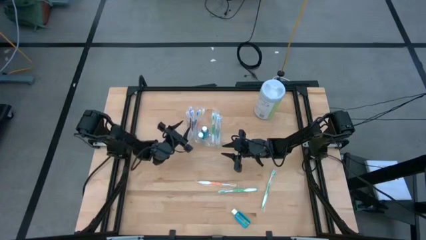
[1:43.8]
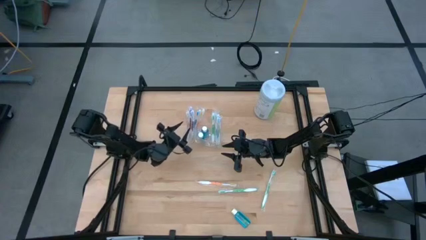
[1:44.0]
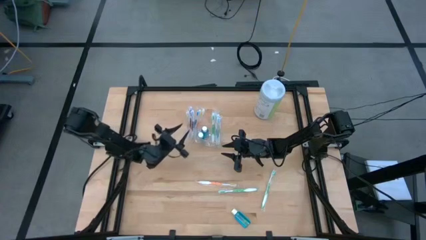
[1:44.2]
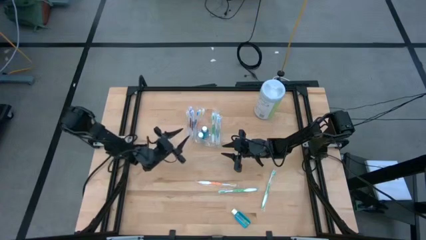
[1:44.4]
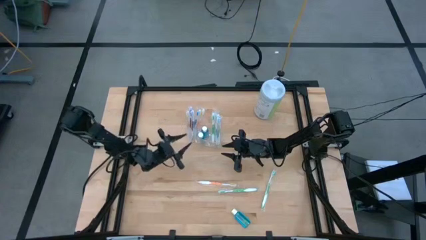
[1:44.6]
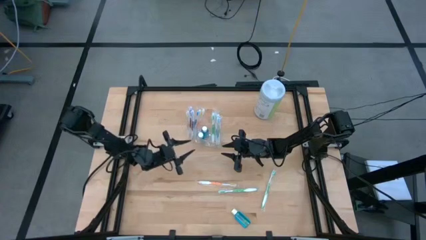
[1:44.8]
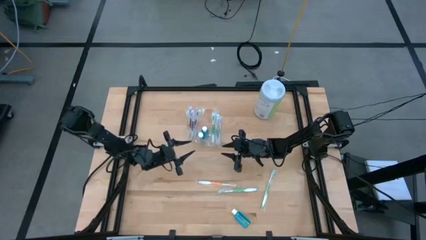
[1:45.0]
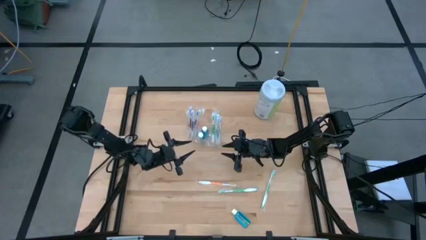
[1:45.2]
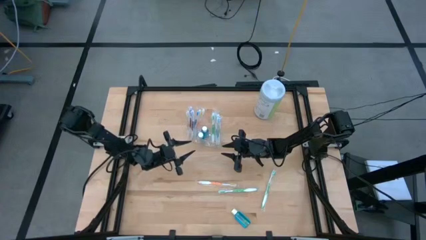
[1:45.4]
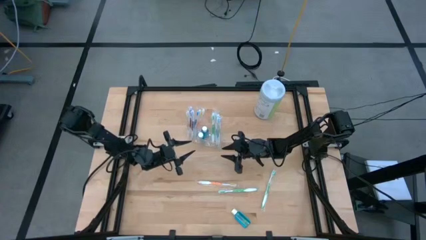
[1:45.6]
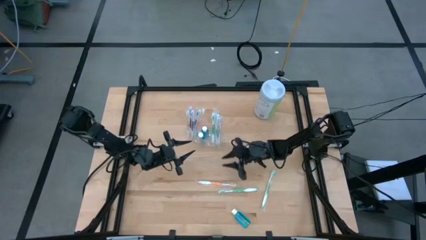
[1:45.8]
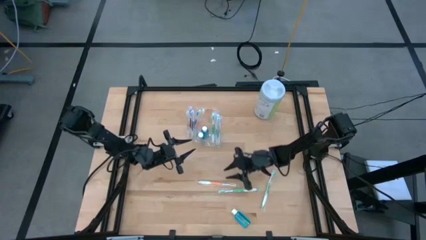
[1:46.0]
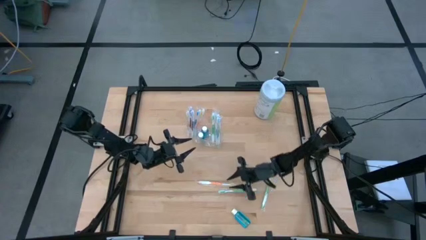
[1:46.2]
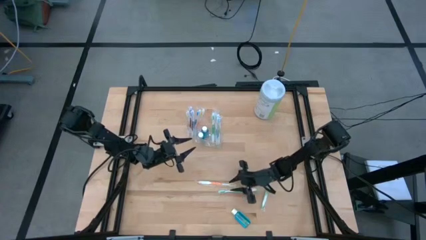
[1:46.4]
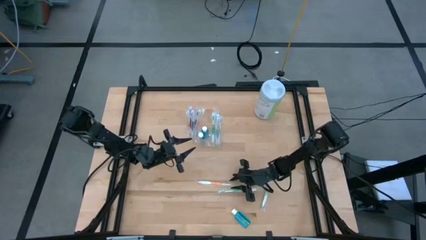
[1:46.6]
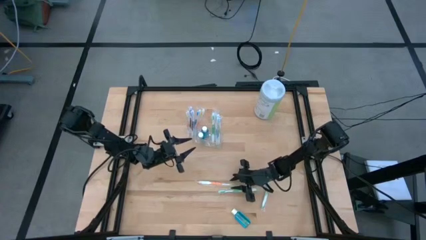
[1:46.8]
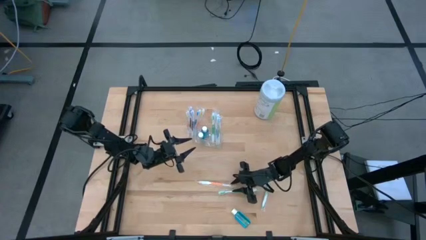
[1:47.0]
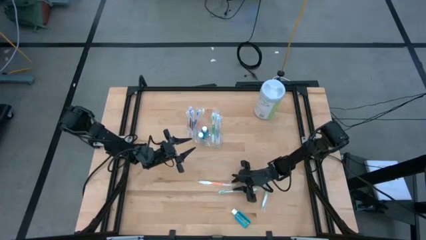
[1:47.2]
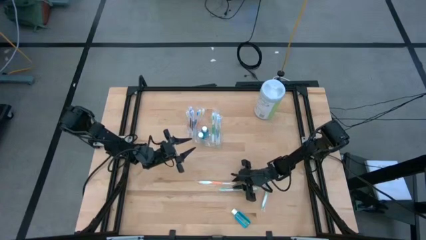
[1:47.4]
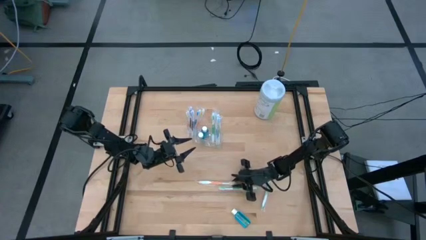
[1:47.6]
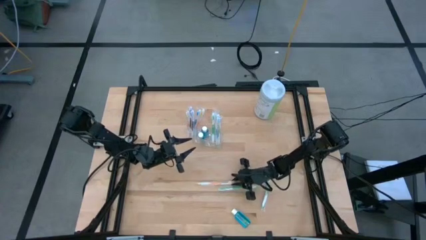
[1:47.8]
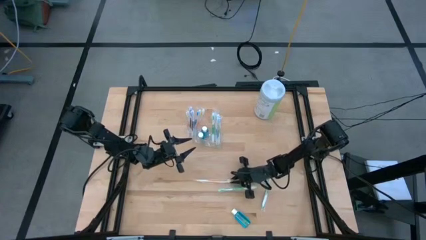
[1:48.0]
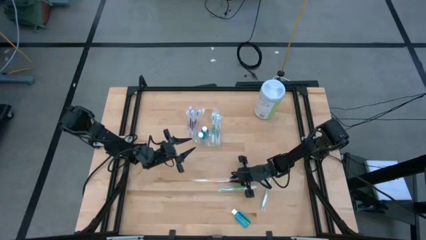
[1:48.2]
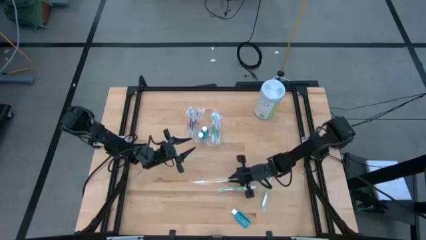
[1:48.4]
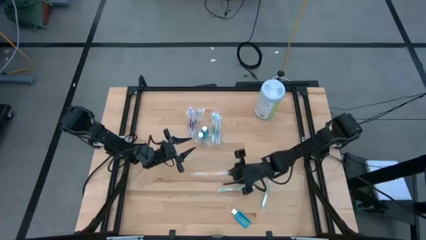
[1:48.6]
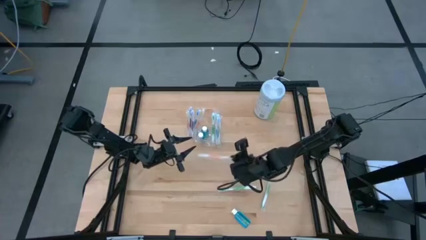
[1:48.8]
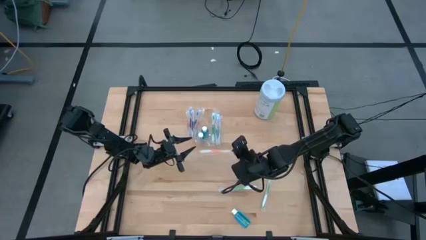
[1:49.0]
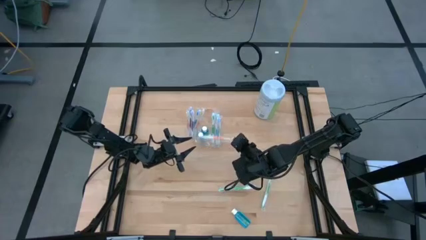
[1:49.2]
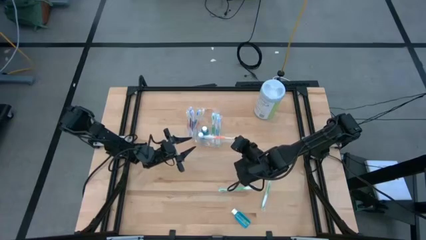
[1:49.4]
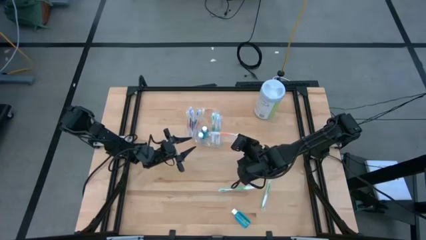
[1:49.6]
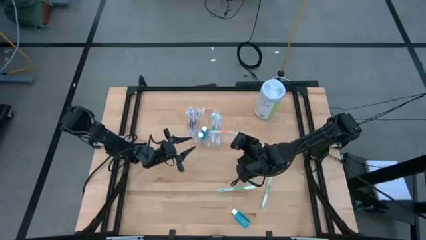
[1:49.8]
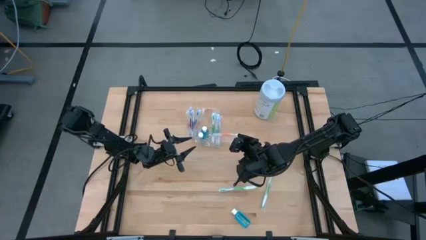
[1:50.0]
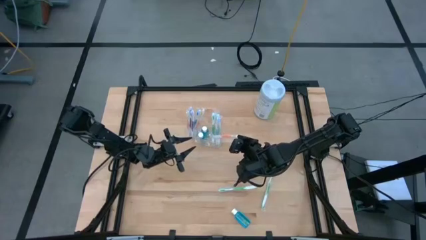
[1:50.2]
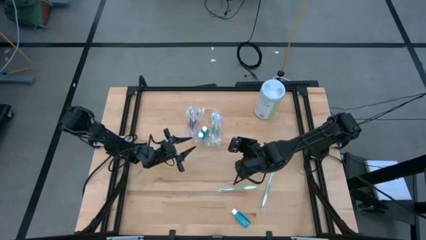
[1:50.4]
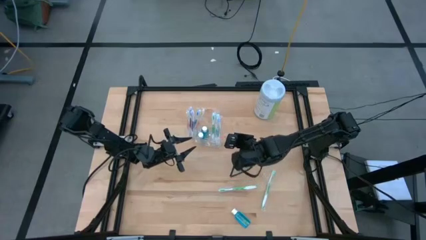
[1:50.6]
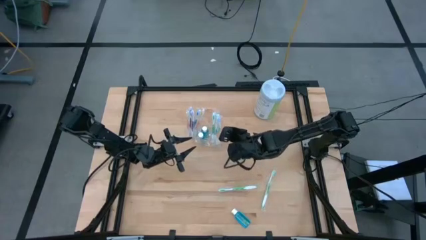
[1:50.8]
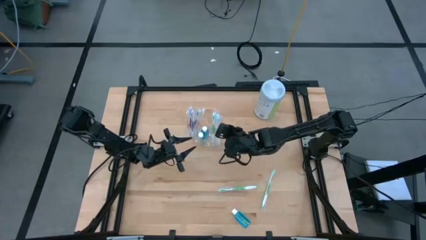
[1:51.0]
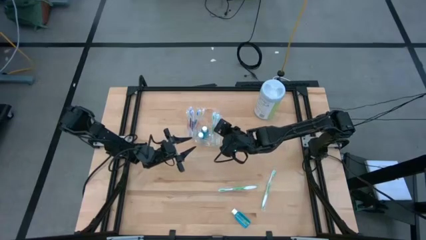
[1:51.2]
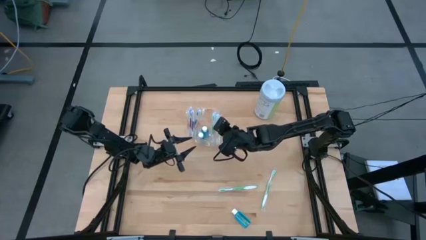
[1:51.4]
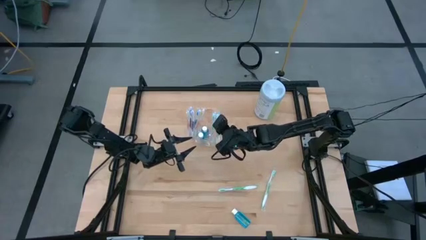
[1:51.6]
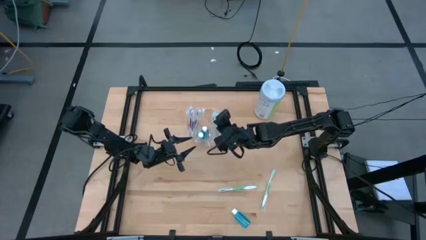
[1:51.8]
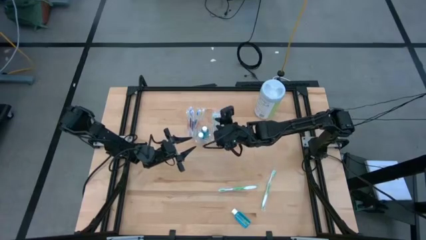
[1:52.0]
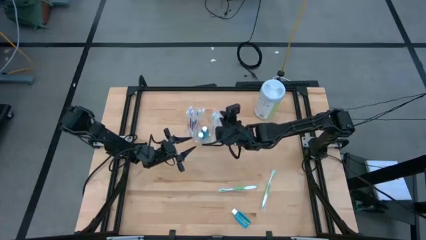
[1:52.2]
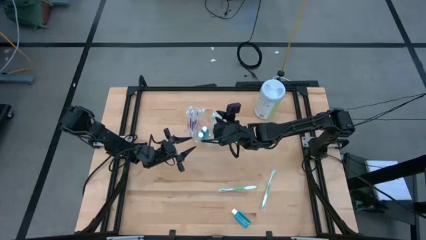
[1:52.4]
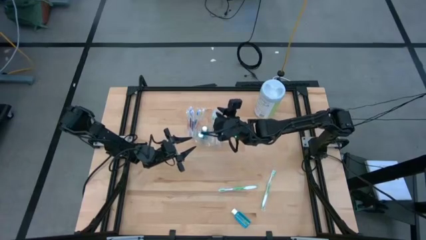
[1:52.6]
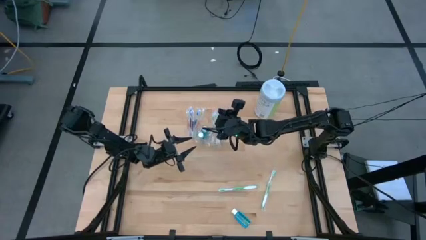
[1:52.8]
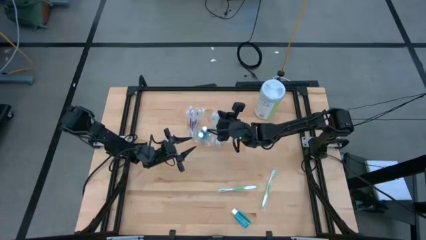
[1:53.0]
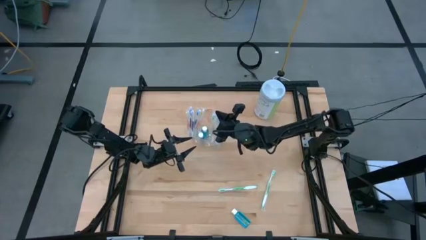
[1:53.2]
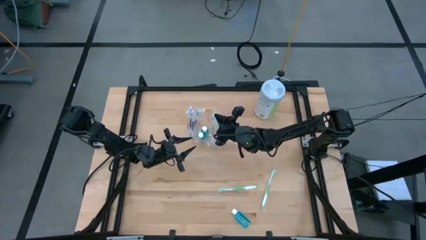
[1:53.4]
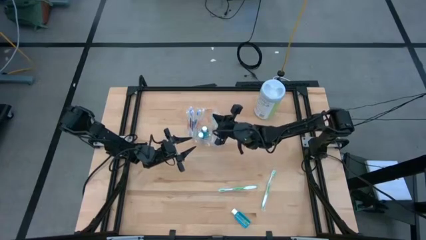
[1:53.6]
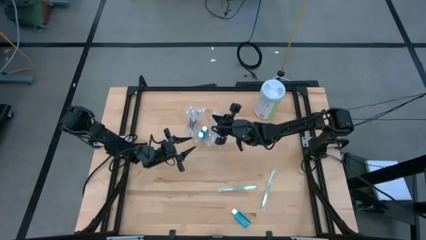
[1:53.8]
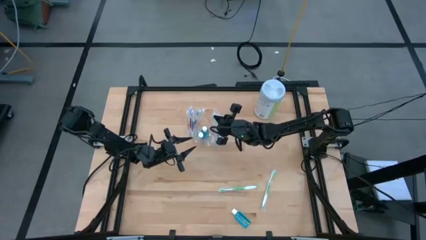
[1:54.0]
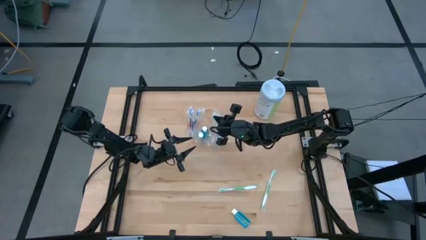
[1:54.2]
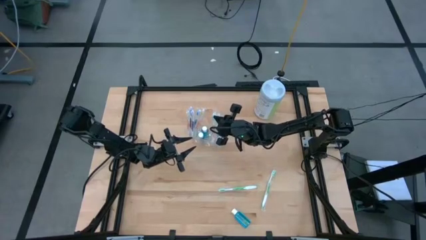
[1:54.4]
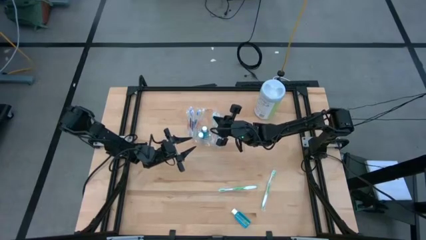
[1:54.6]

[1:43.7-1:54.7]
Task: Pick & Place toothbrushing station
Put the orange toothbrush into the transparent organizer

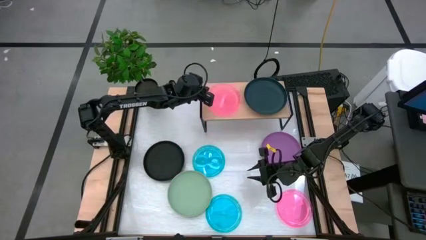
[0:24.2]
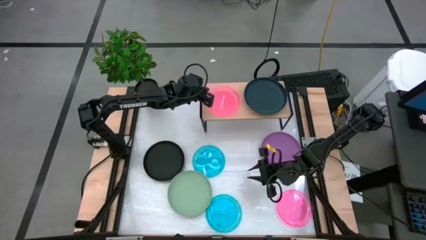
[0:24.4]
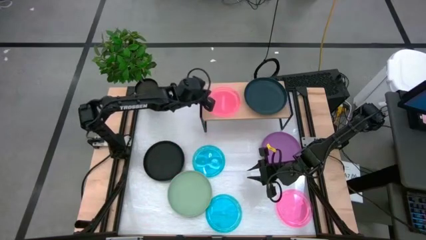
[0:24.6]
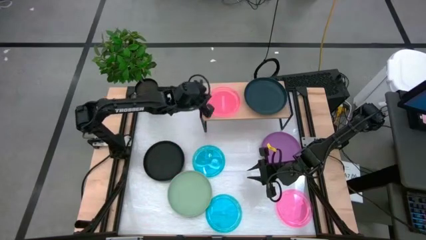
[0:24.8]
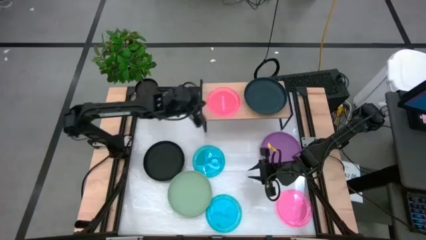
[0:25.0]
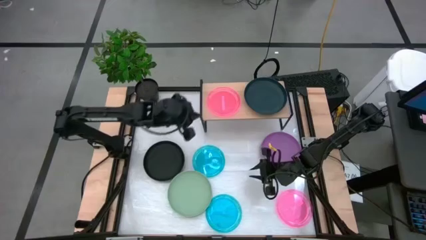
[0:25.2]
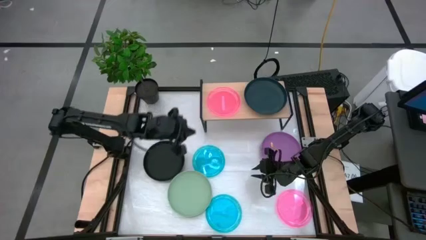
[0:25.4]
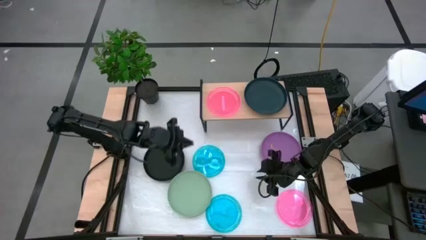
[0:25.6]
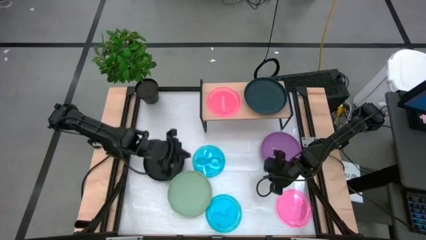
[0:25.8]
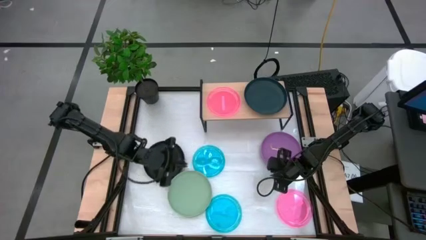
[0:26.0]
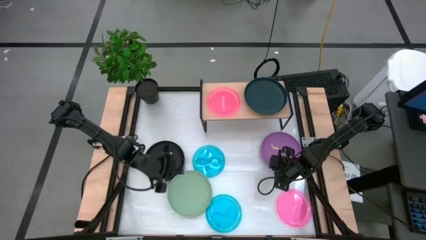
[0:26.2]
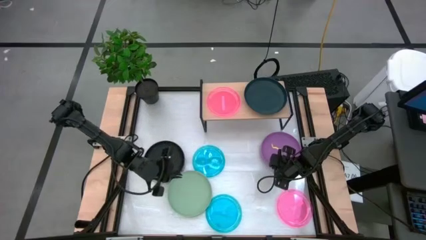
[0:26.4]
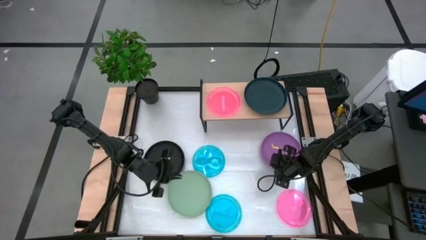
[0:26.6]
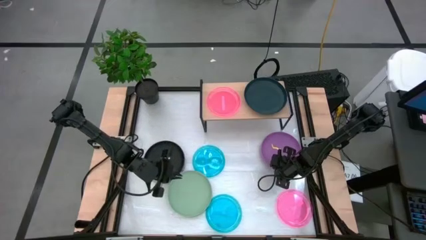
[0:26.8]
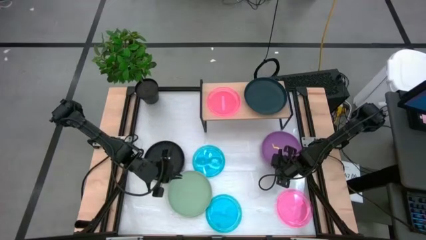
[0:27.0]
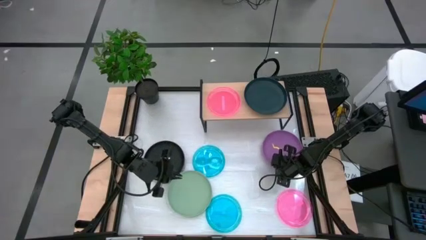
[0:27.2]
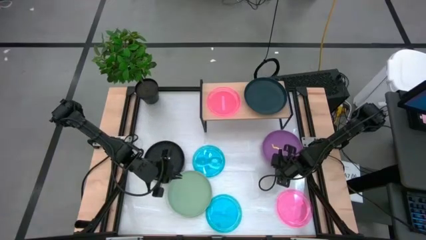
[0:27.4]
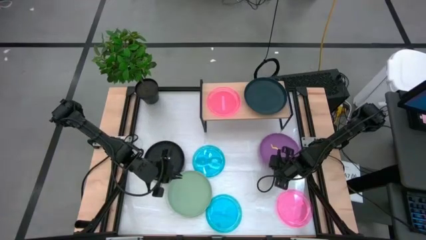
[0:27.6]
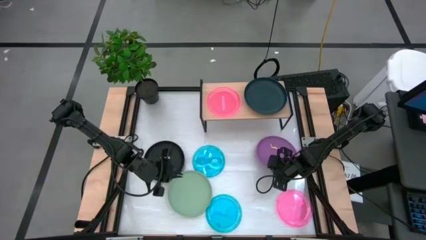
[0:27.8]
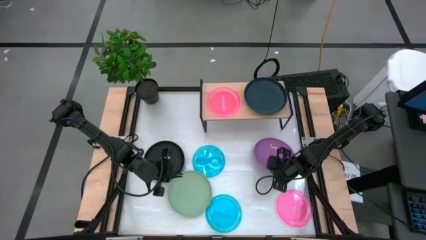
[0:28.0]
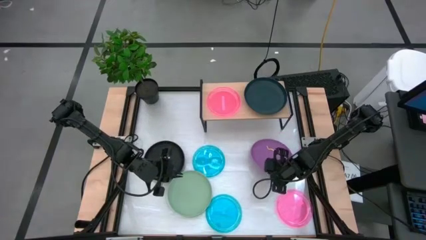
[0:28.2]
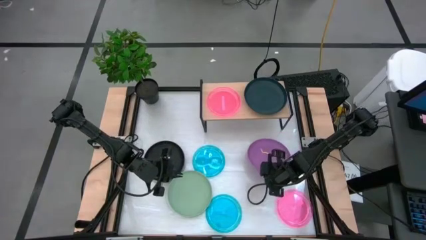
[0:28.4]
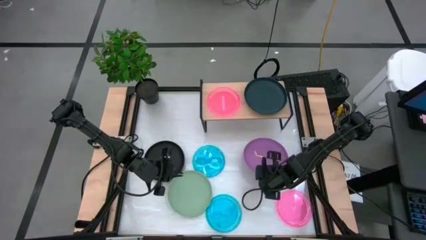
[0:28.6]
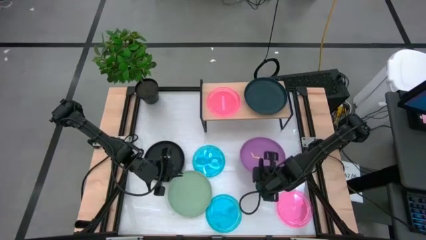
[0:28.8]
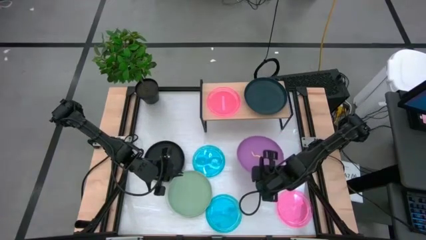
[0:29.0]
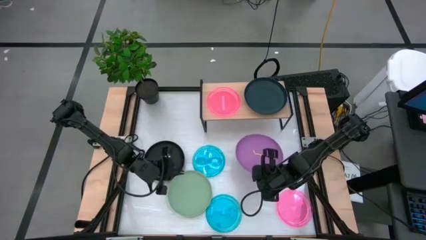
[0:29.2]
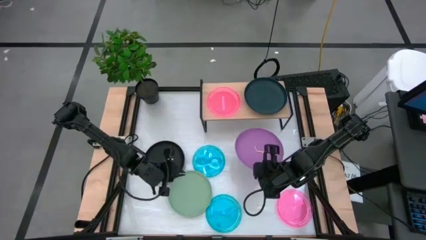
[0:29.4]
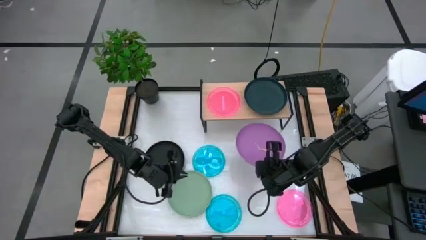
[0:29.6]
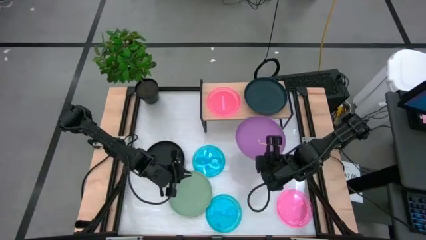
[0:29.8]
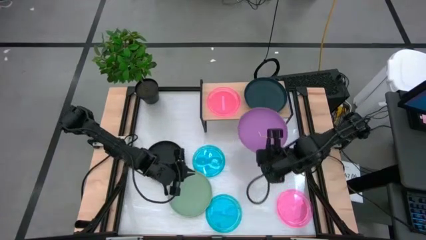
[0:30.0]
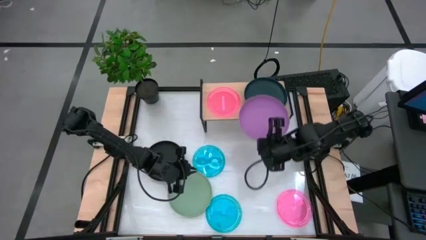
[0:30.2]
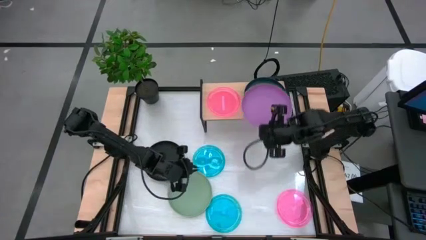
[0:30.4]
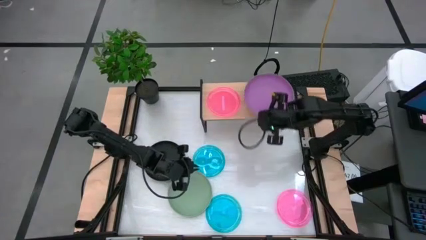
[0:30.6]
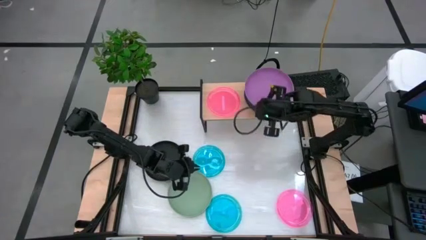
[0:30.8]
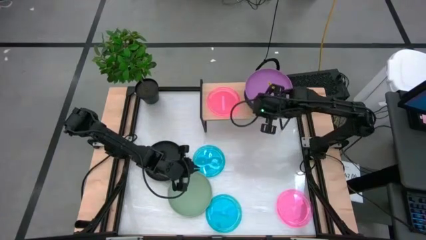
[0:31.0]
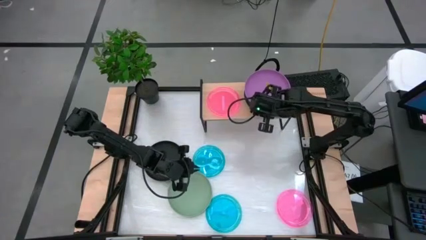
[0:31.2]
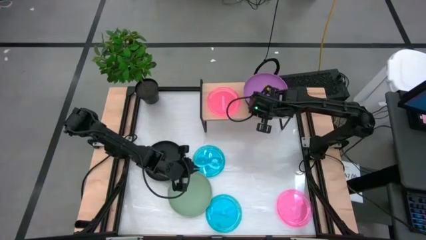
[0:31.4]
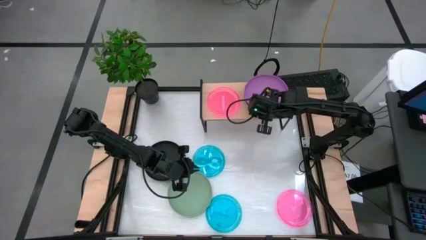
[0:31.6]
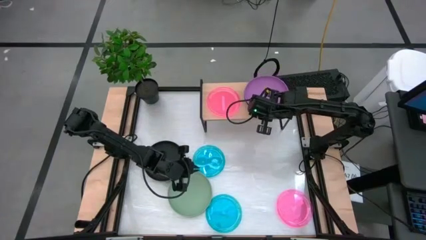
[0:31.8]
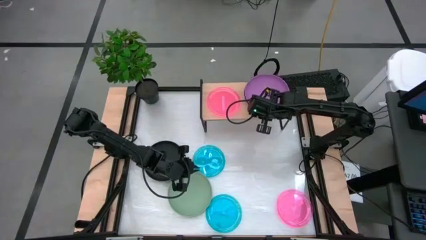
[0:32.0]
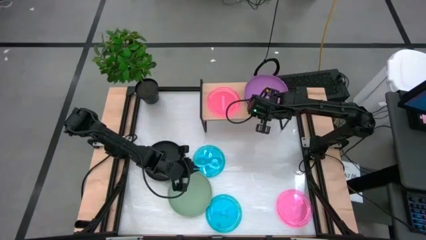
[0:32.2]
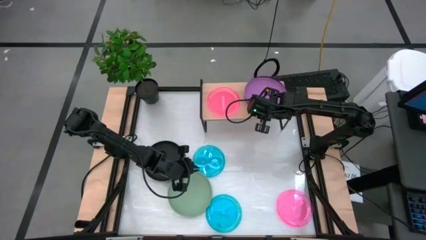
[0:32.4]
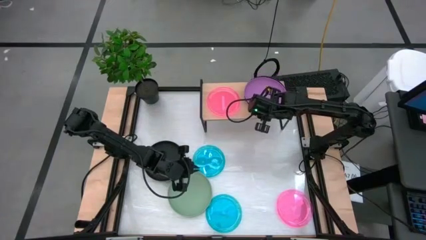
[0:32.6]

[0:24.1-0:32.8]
Task: Place and stack plates onto a shelf
Stack the violet plate on top of the dark green plate on the shelf
